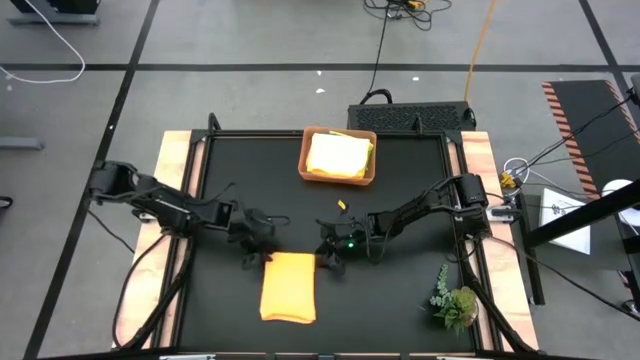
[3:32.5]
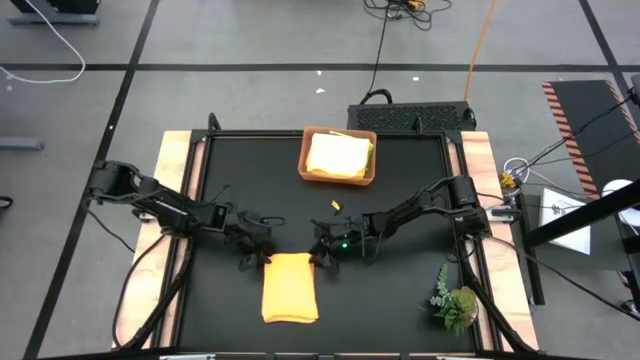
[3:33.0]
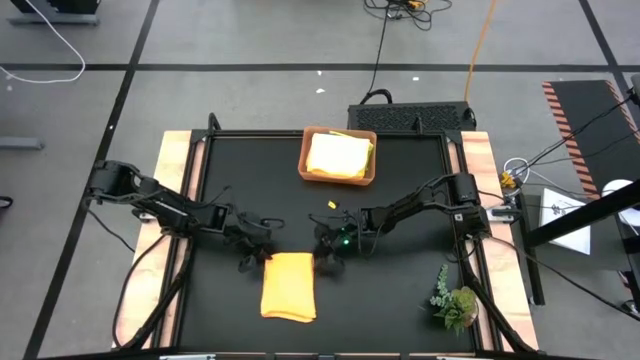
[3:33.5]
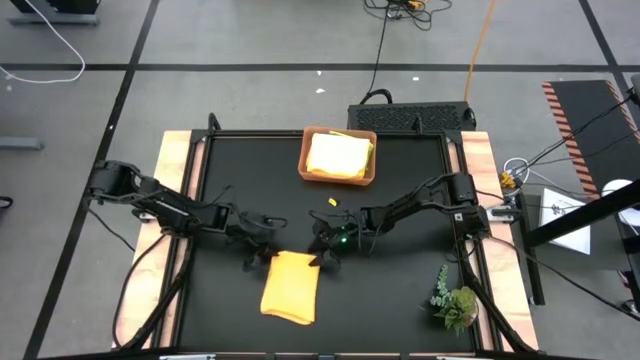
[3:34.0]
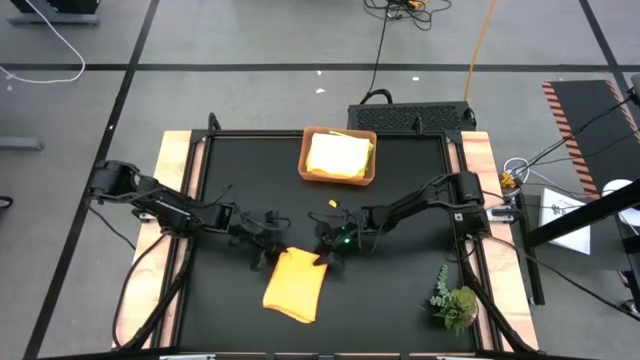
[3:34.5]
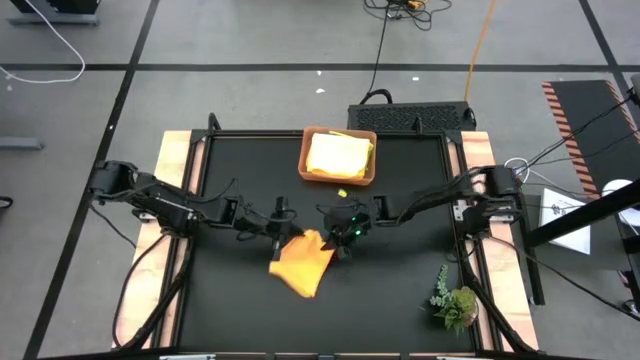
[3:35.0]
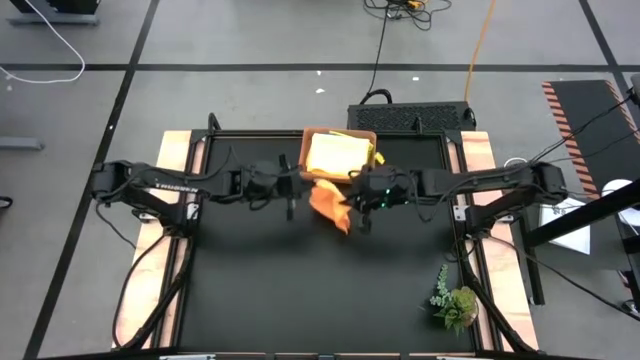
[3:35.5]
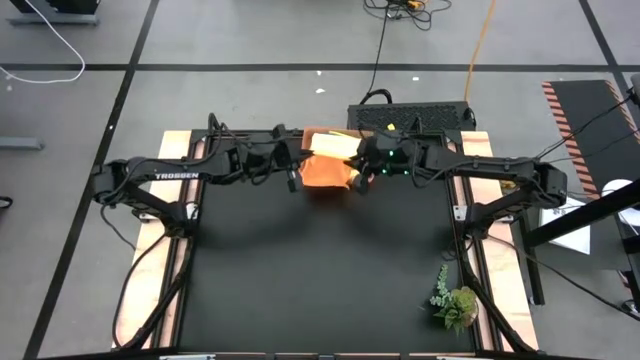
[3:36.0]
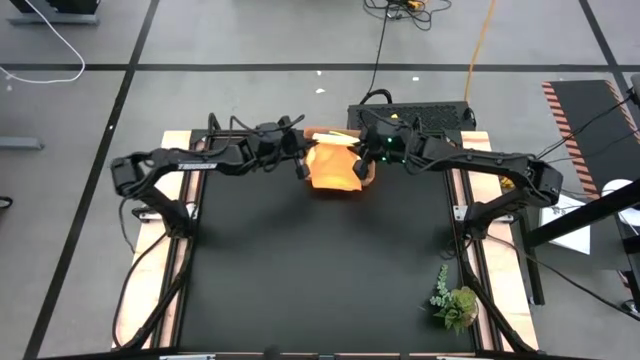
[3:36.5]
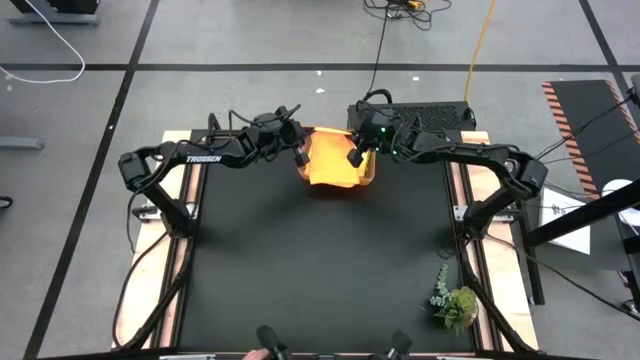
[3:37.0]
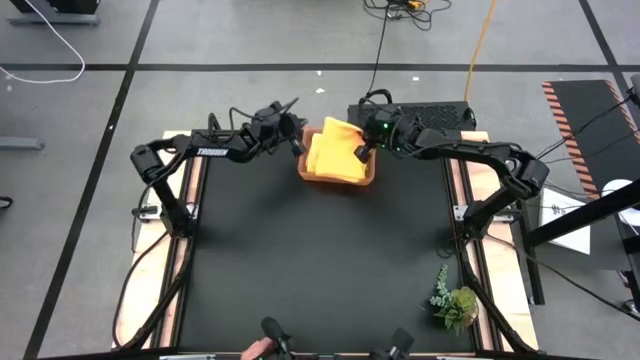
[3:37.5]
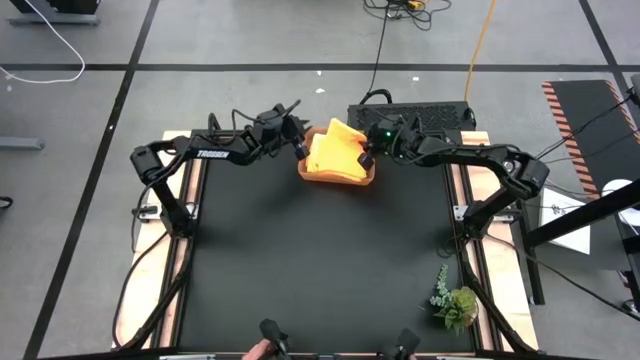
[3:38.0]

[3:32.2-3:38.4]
Task: Fold microfiber towels
Put the orange microfiber towel into the orange bin

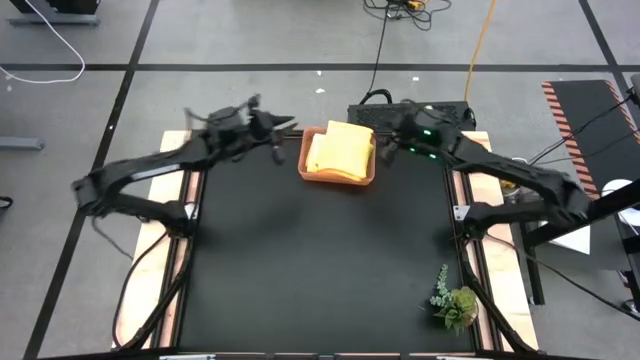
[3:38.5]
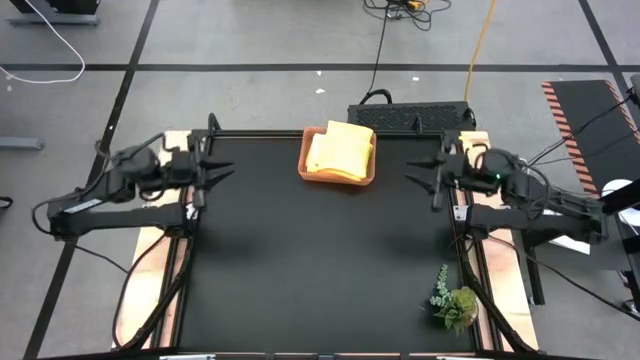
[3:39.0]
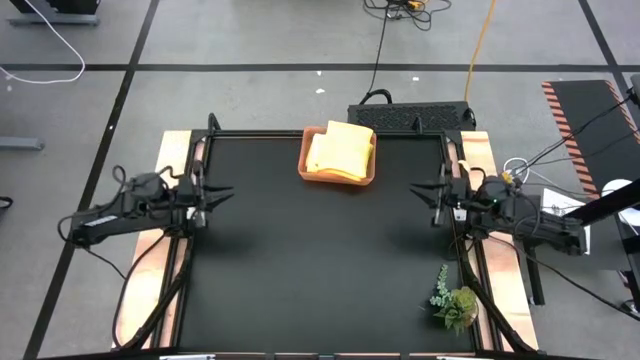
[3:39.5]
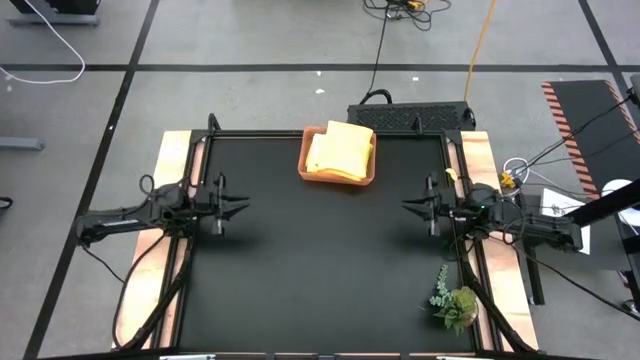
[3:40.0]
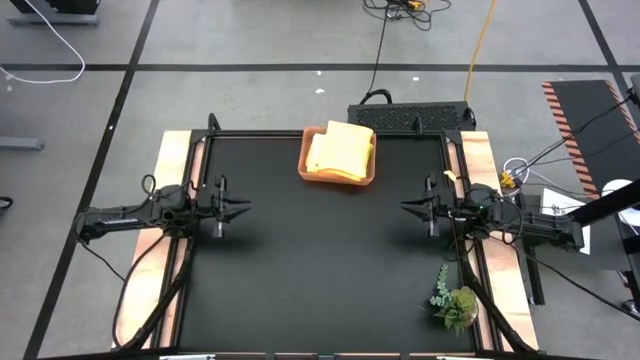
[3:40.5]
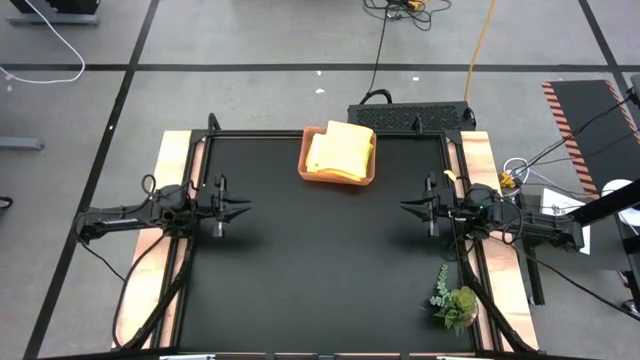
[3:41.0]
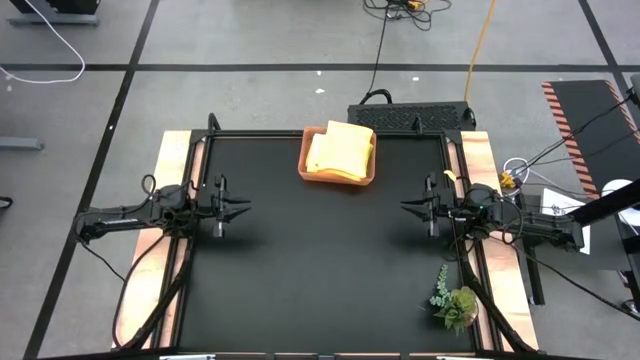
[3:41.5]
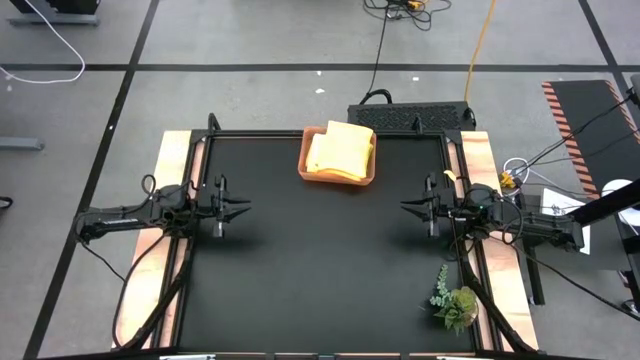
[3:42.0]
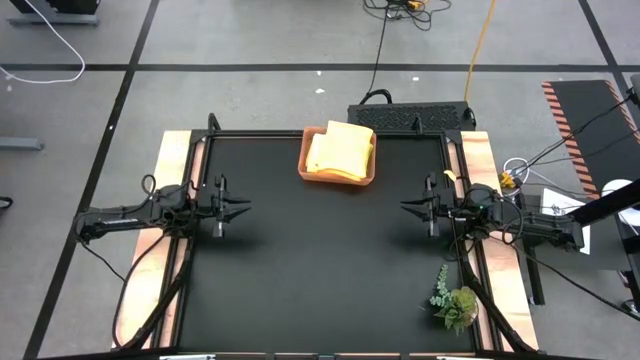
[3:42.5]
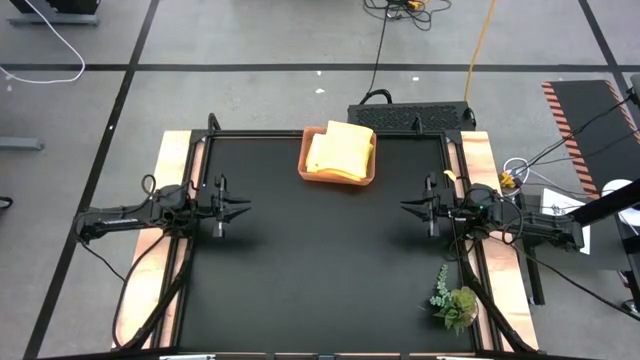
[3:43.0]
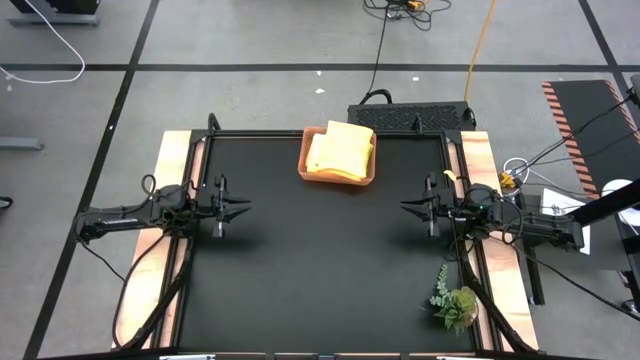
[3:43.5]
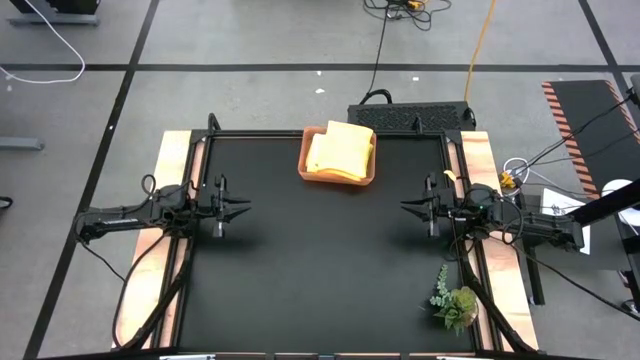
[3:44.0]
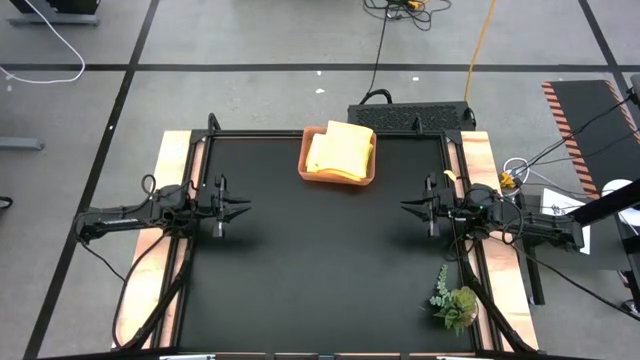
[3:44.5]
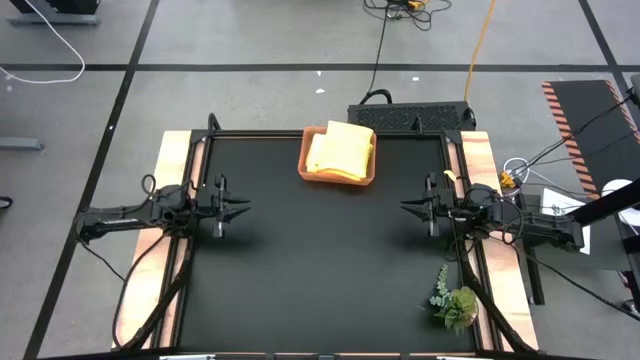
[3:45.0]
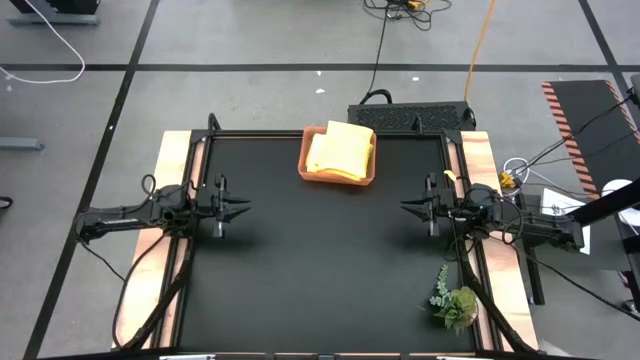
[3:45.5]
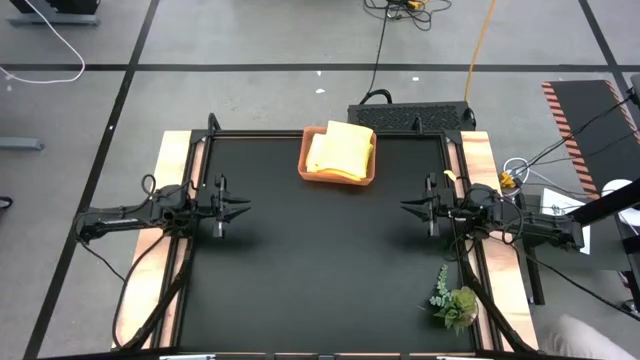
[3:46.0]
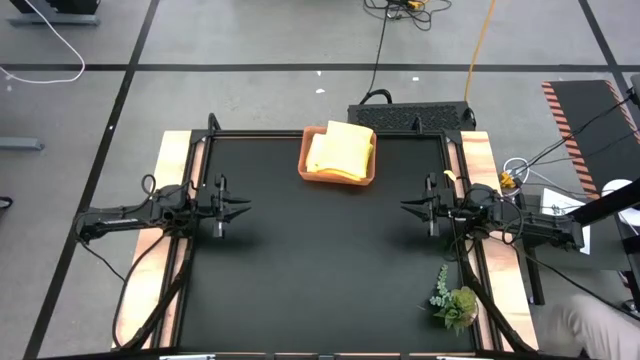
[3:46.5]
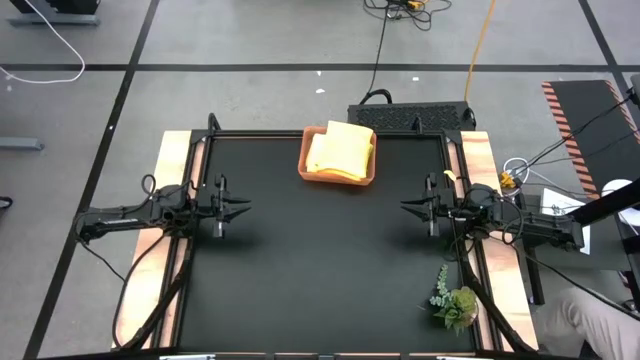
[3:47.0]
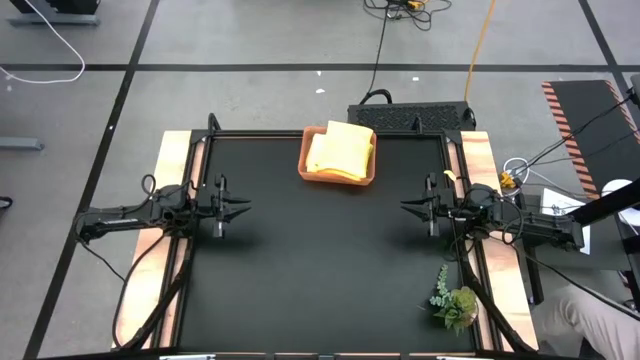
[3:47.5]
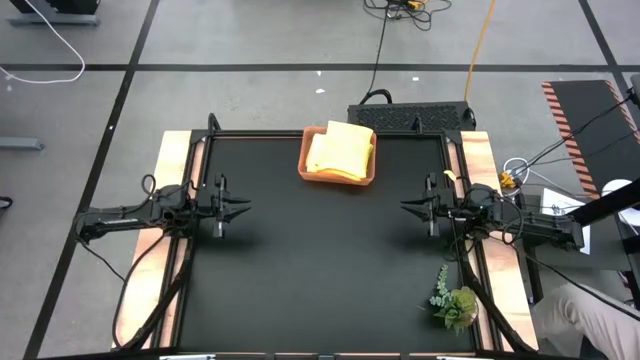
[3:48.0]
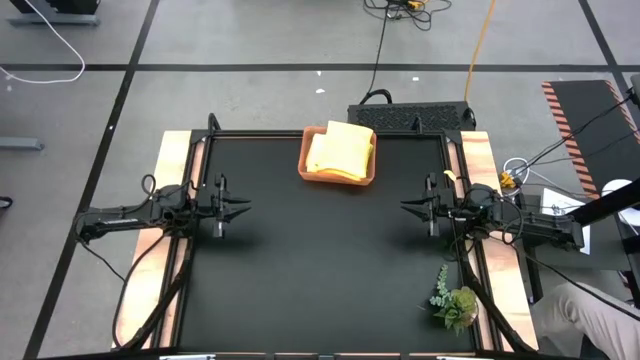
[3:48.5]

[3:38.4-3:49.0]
Return to Home Position

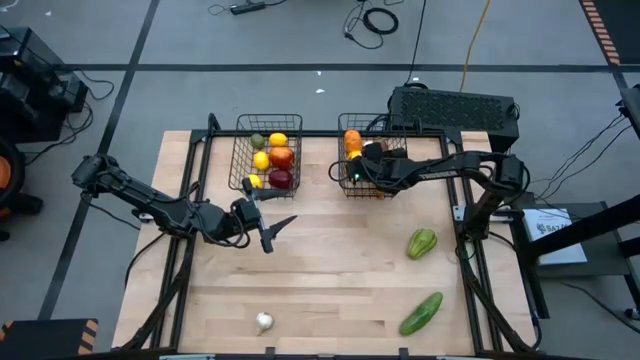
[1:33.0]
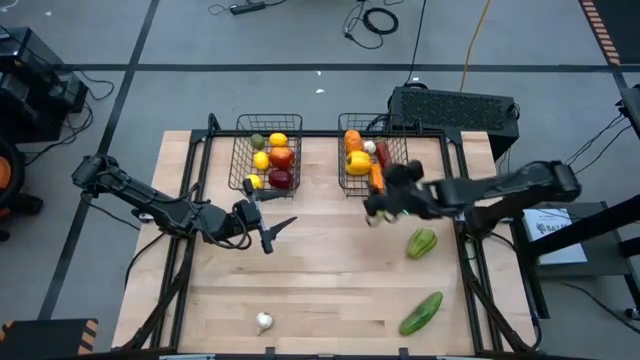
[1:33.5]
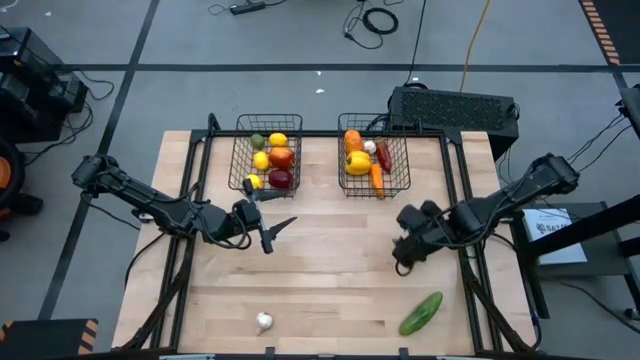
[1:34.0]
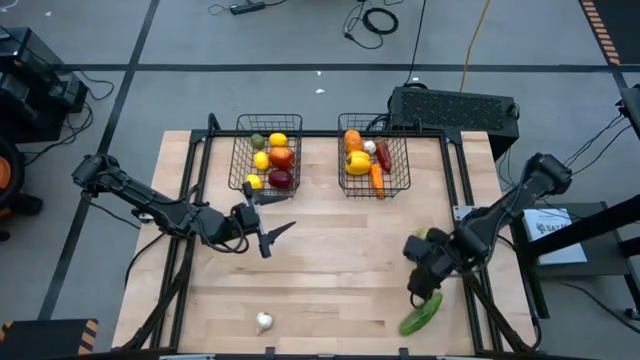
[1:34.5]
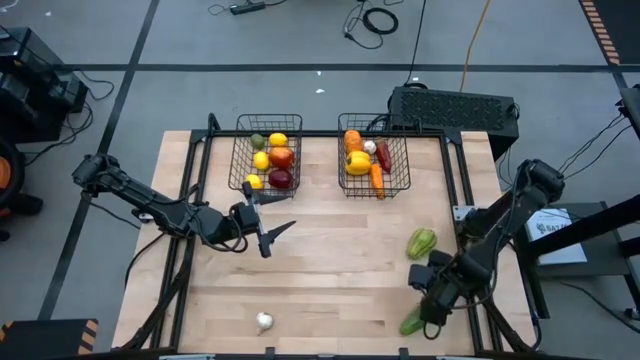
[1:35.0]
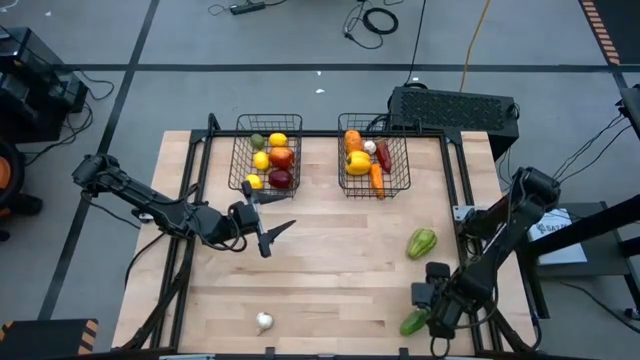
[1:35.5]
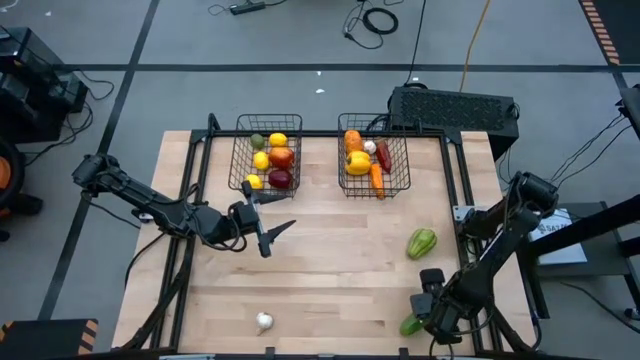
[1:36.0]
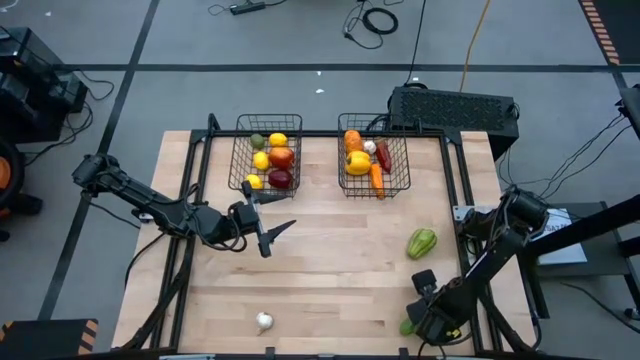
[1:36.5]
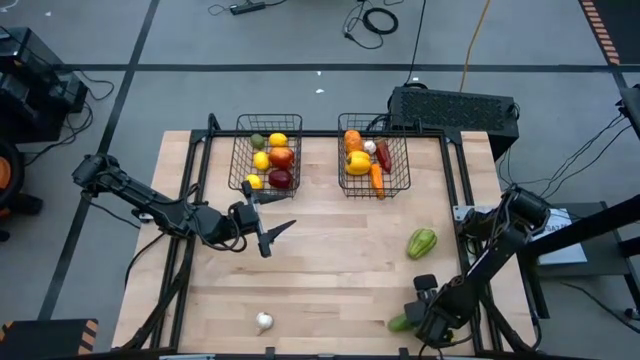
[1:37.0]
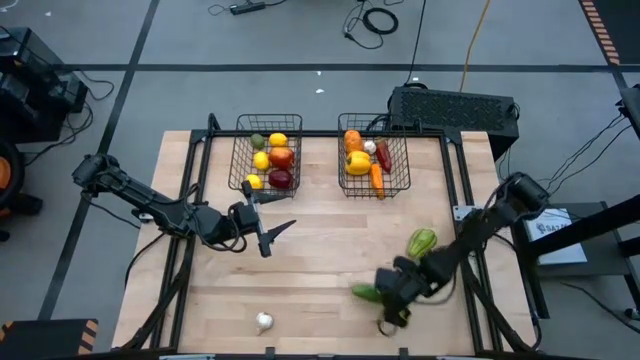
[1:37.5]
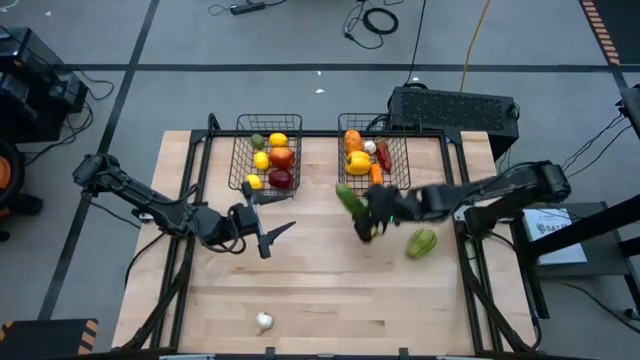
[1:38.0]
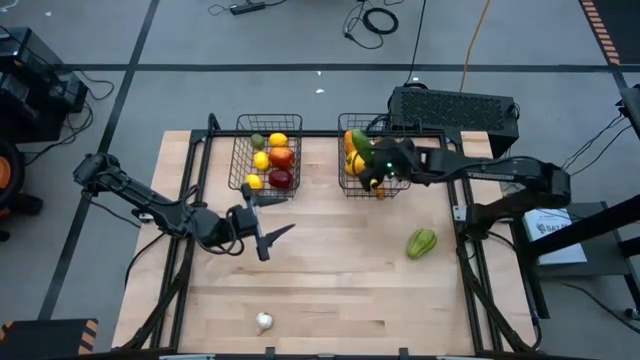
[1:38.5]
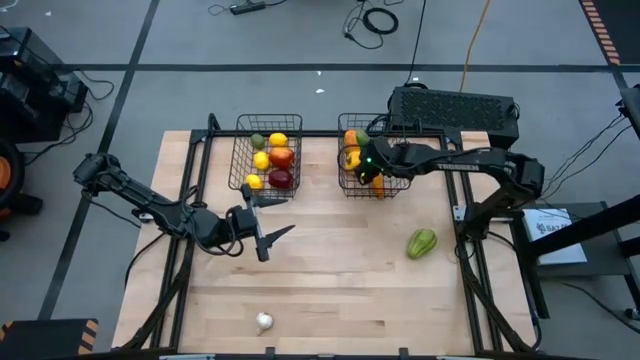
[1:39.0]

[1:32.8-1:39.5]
Task: Sort produce into baskets
Put the green cucumber into the right mesh basket
